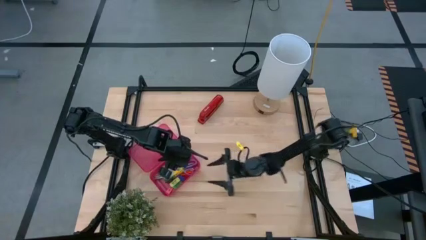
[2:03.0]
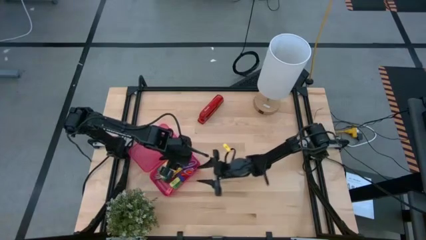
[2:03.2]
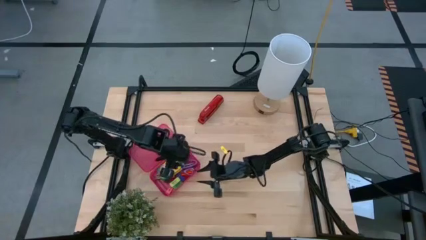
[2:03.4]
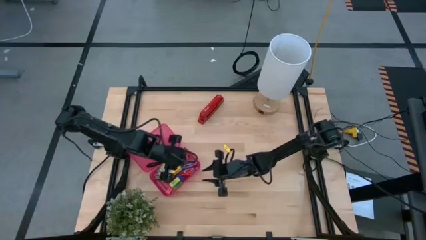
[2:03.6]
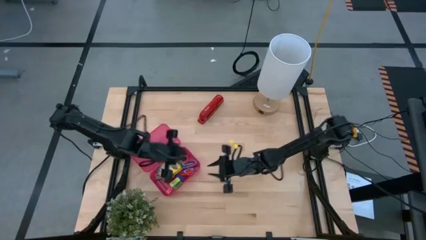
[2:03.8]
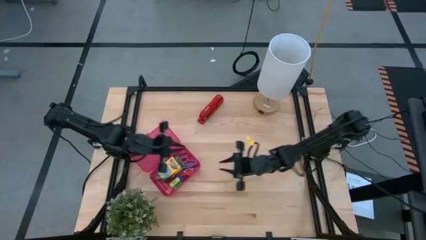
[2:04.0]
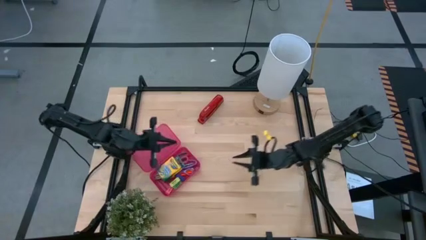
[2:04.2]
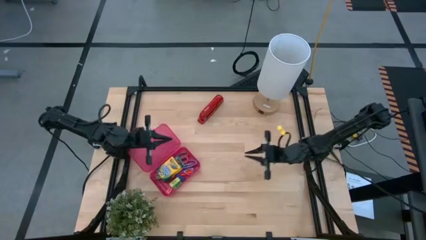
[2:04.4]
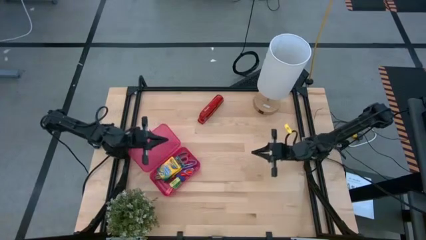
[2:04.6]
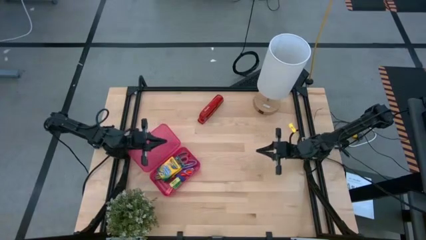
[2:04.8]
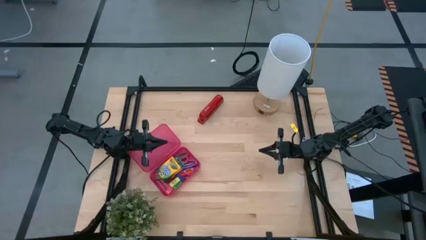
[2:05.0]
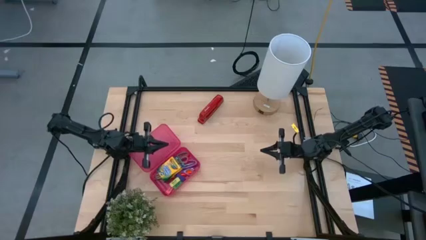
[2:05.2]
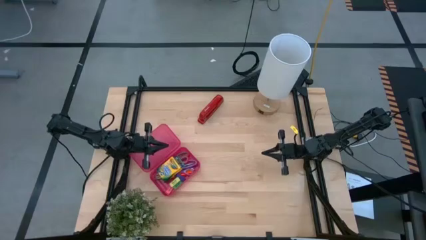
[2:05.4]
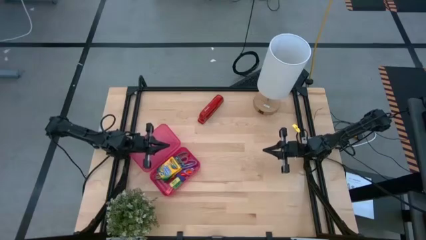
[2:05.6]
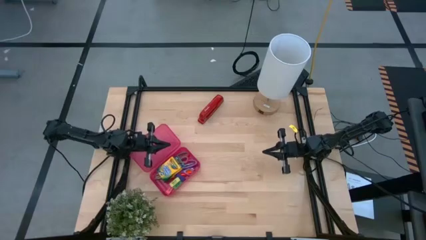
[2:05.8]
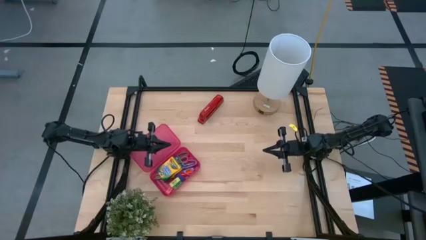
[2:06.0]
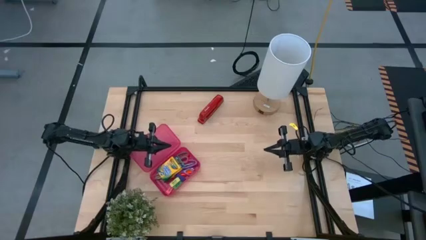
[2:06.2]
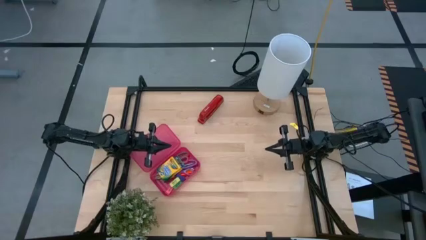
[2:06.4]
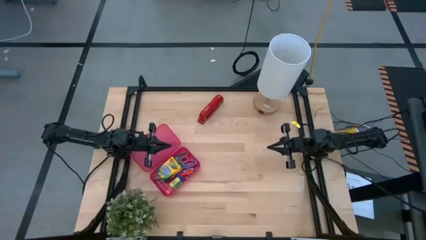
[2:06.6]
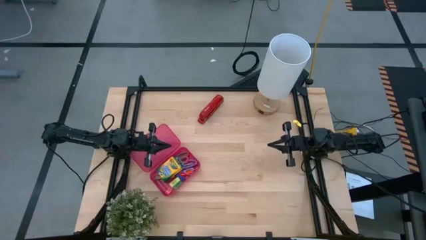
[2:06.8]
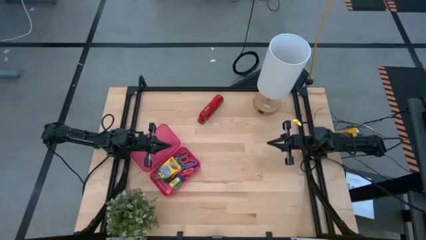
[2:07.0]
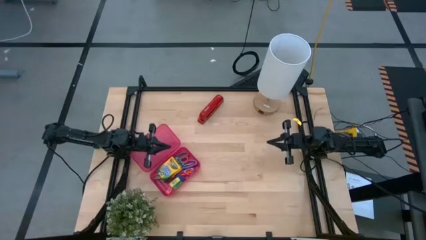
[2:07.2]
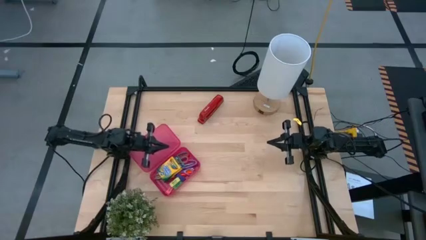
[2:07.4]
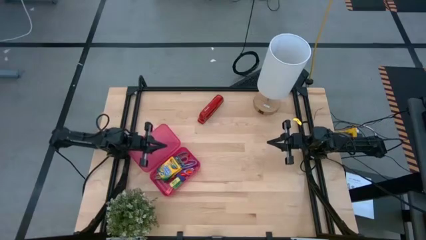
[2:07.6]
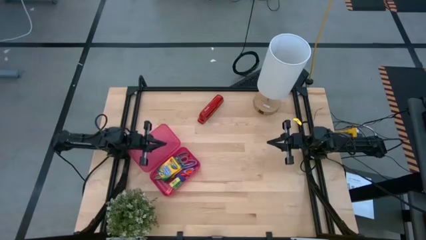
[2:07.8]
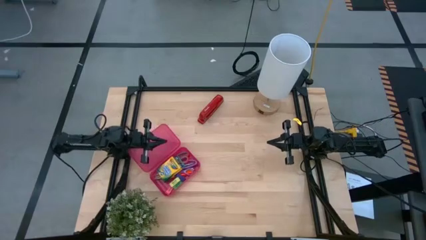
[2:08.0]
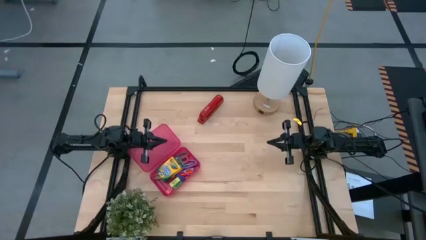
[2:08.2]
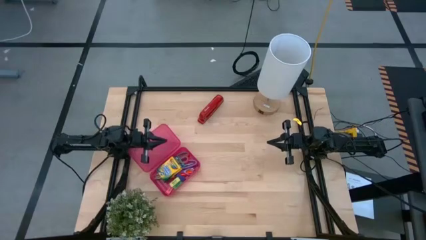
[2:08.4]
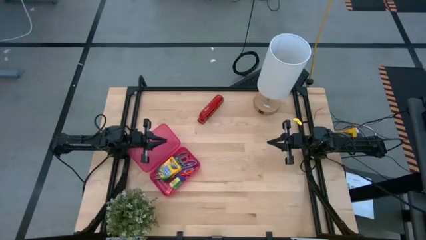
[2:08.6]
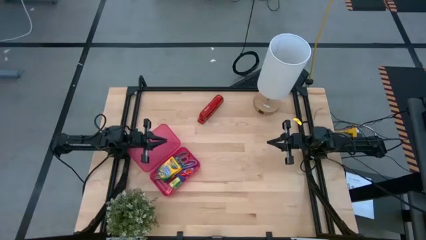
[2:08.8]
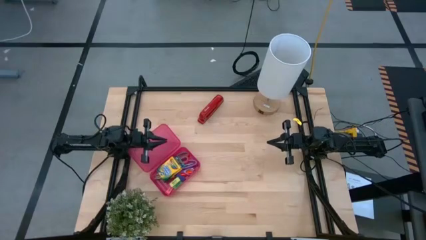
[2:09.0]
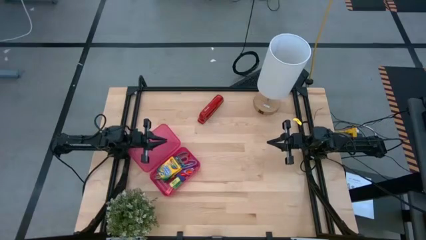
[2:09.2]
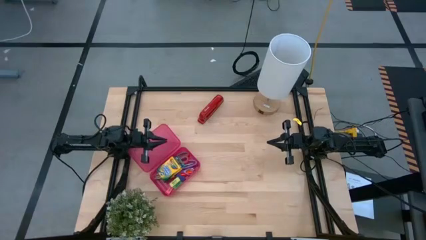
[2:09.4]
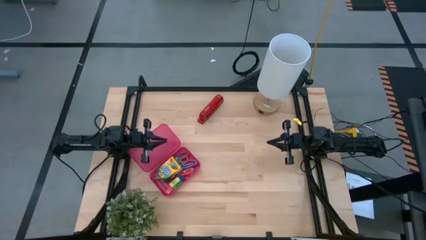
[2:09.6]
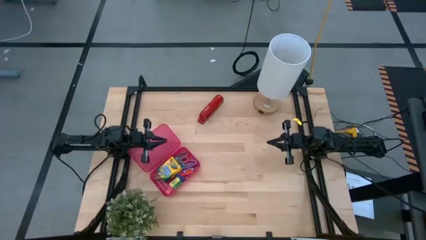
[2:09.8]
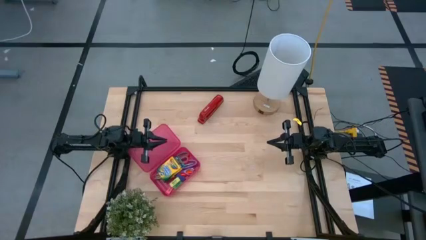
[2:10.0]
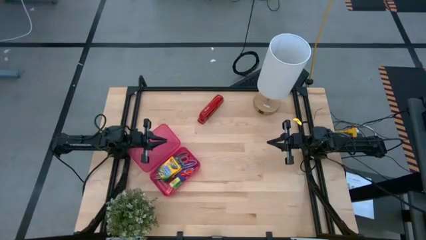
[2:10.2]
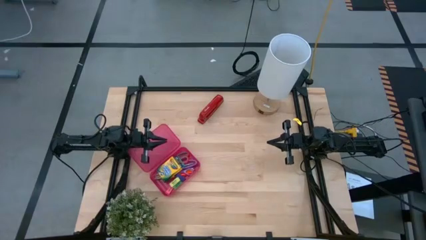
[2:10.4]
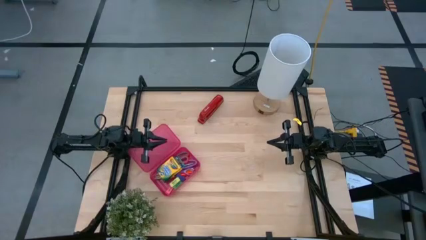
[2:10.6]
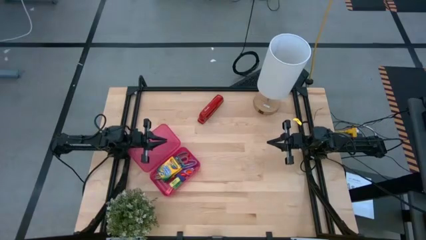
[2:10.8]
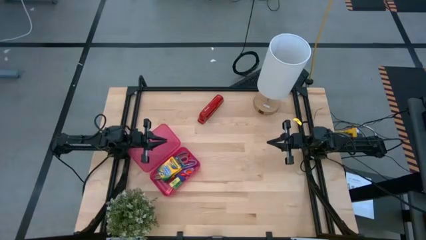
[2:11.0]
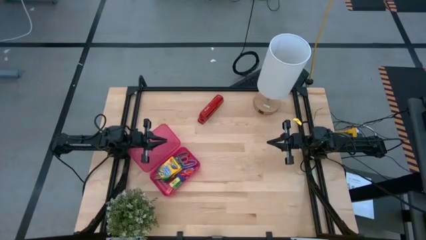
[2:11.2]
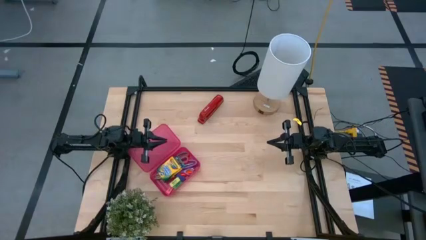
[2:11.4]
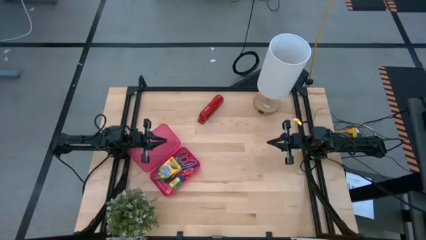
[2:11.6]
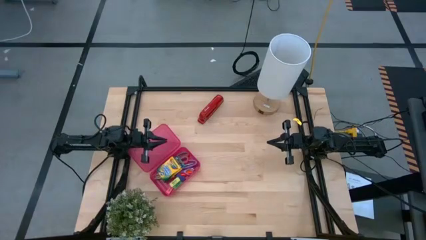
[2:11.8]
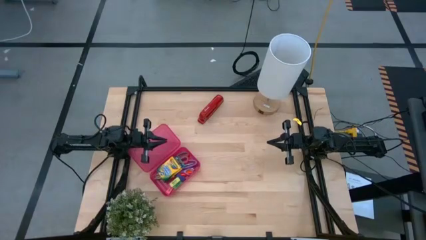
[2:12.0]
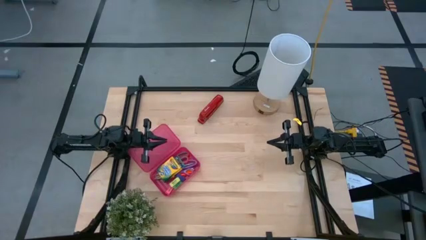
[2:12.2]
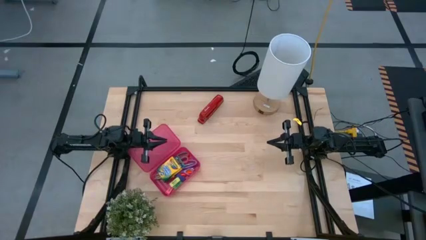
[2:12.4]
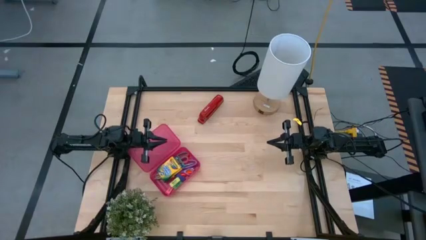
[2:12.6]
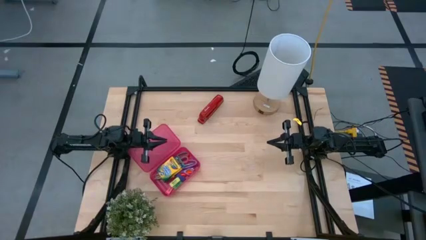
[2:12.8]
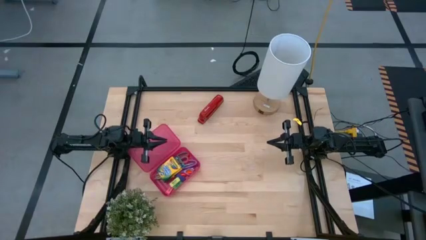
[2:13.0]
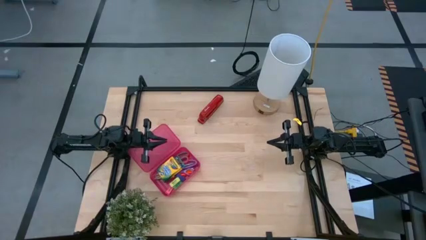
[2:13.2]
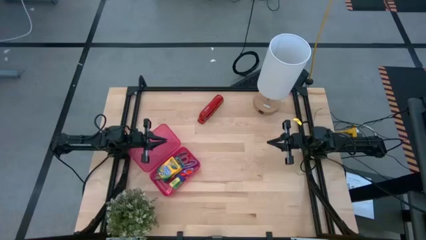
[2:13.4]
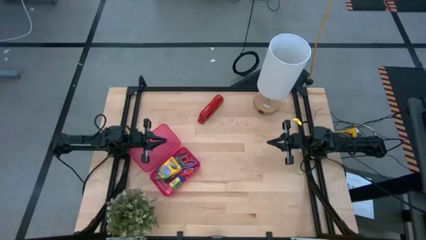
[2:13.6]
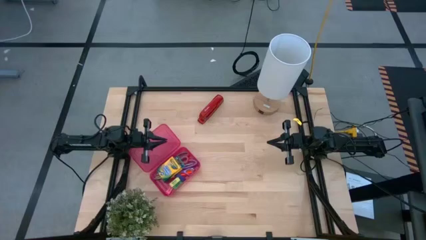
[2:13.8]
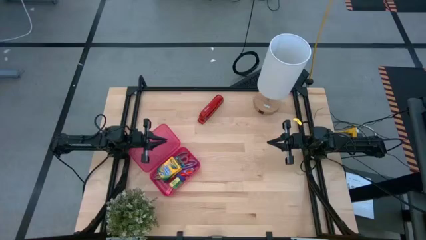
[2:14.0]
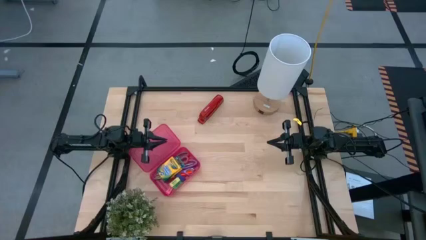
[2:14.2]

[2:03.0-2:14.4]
Task: Pack school essentials
Return to Home Position
